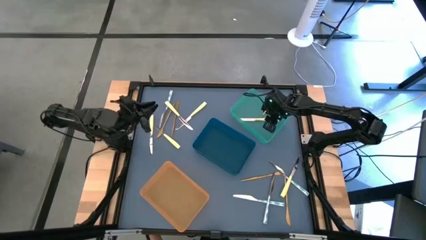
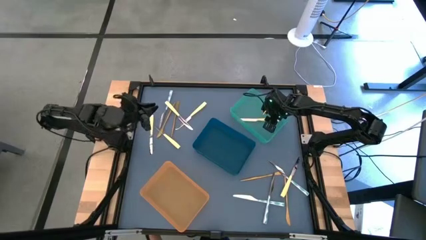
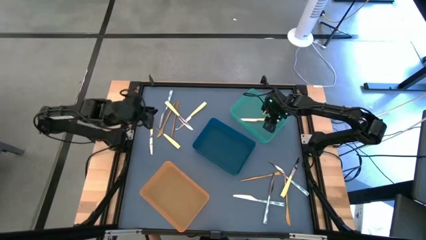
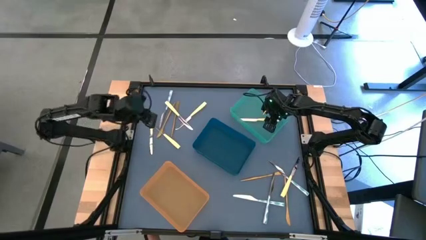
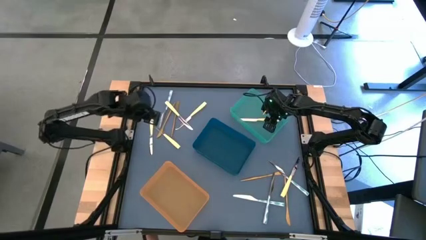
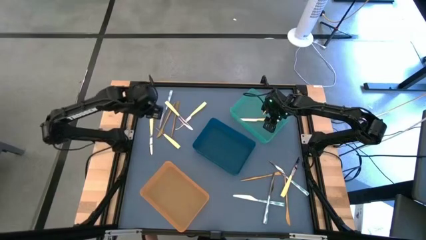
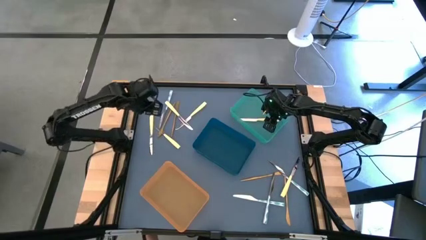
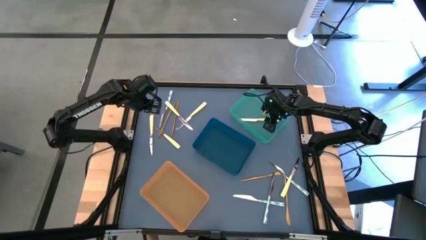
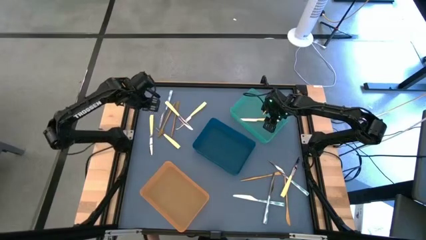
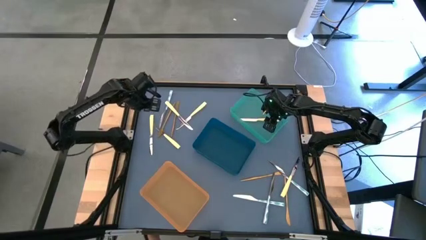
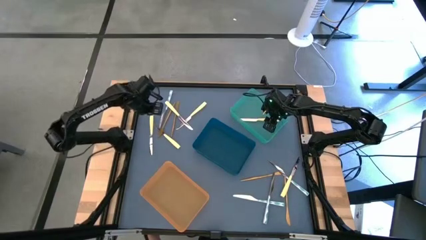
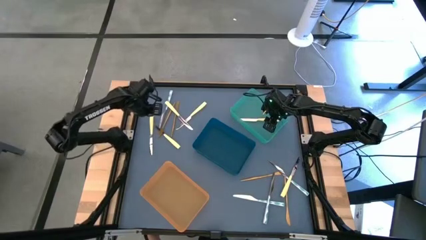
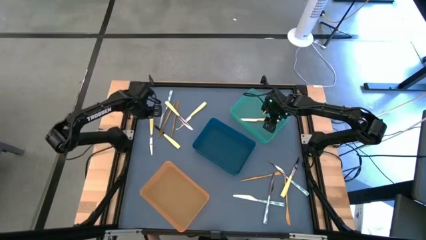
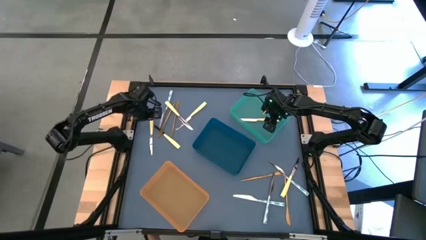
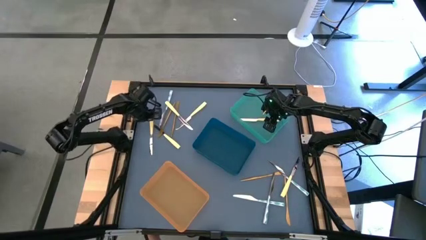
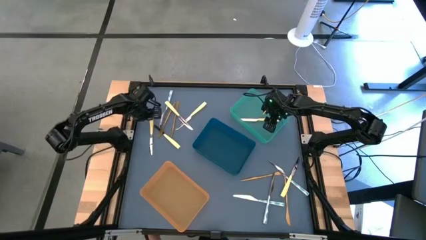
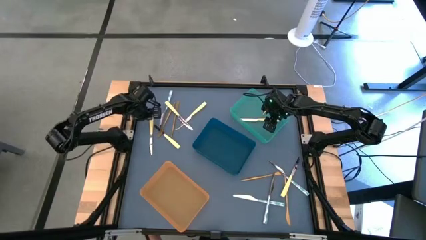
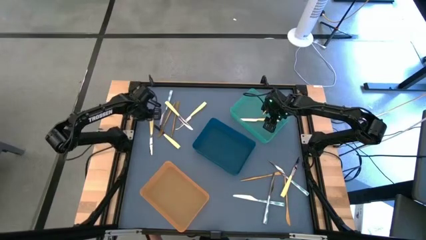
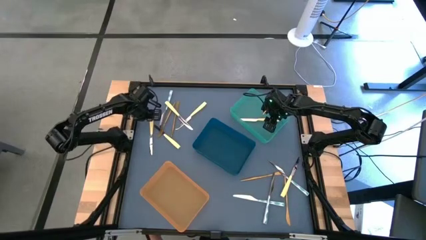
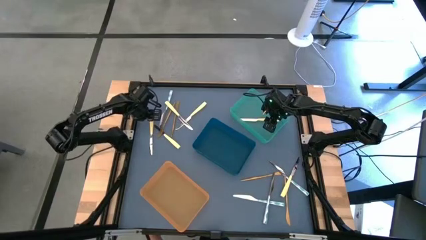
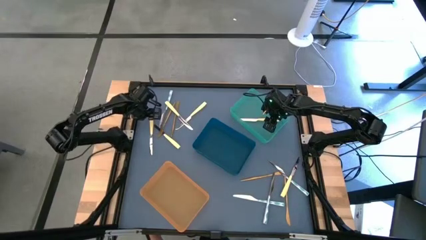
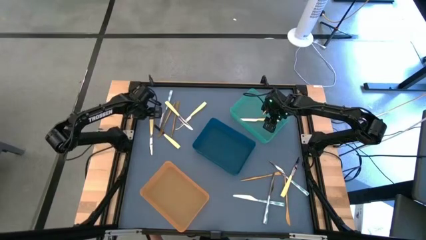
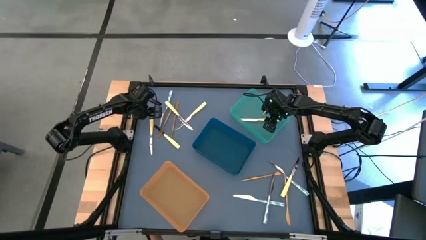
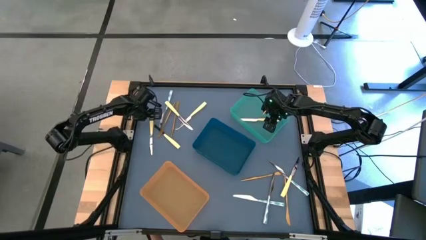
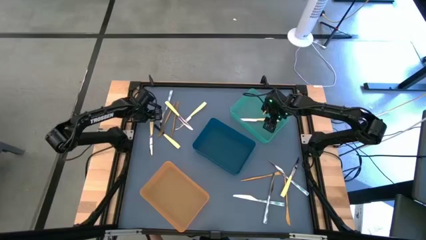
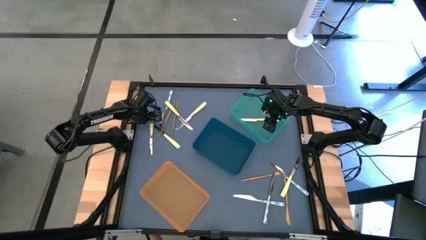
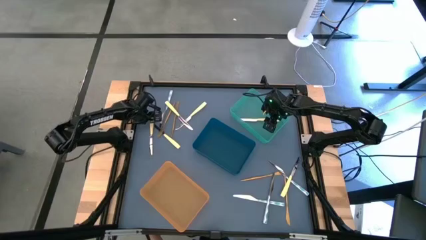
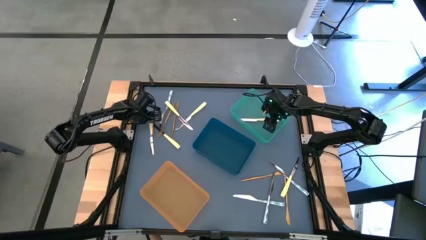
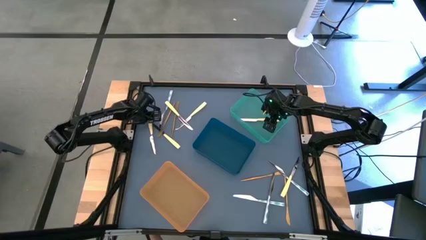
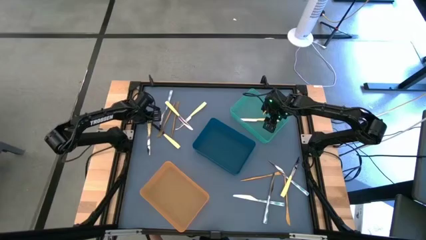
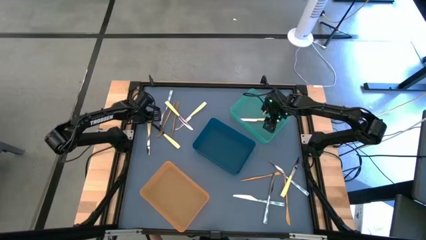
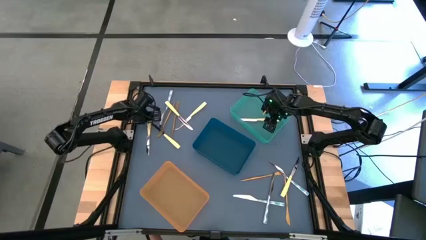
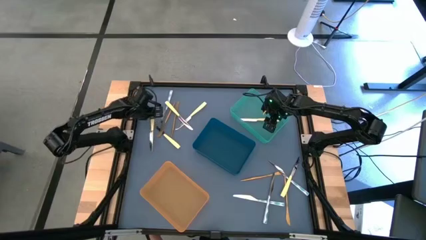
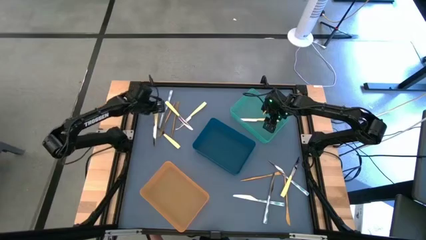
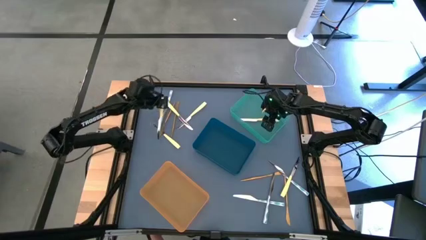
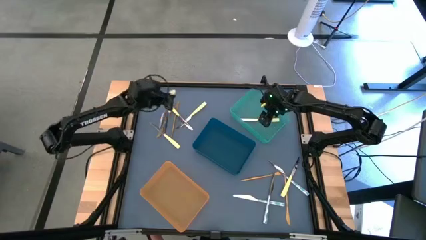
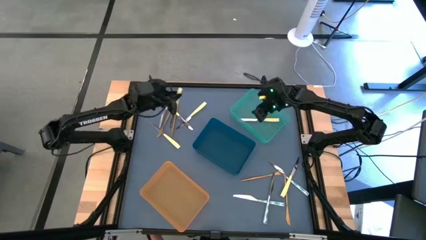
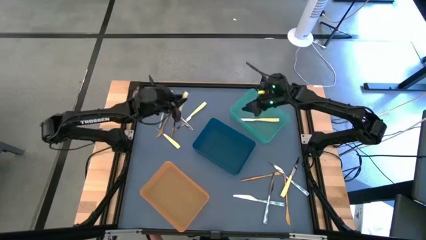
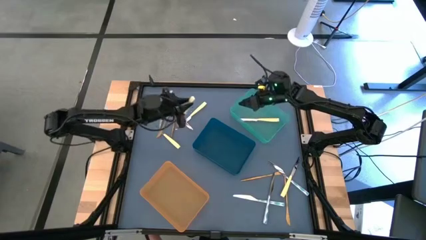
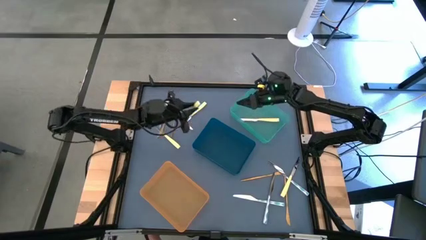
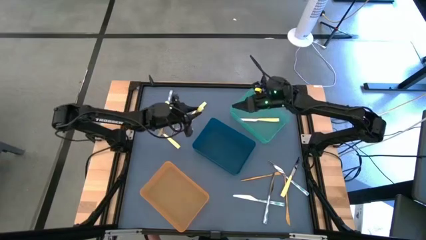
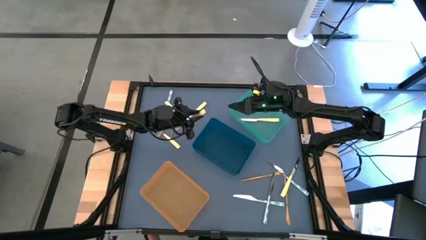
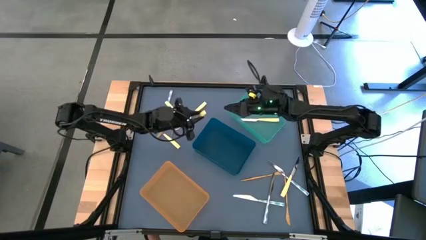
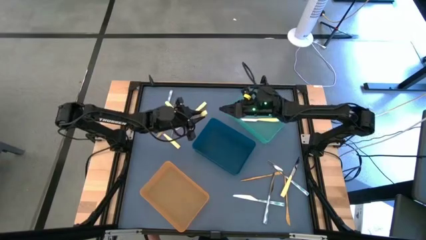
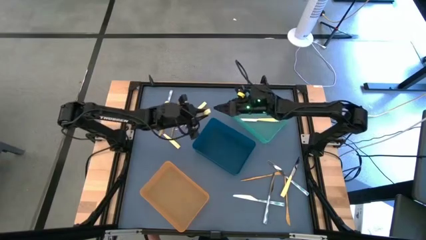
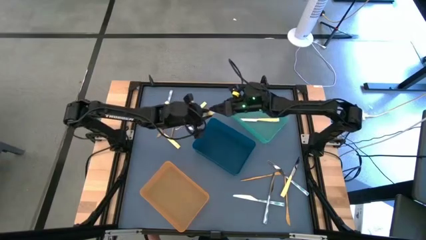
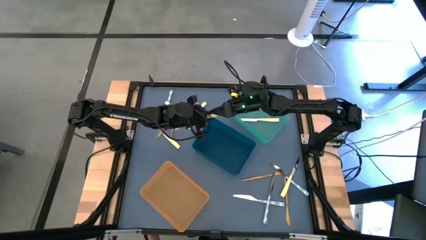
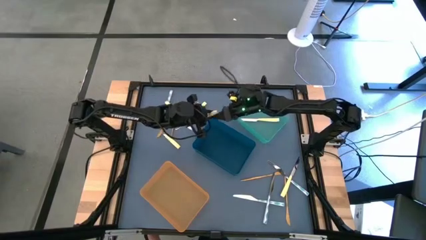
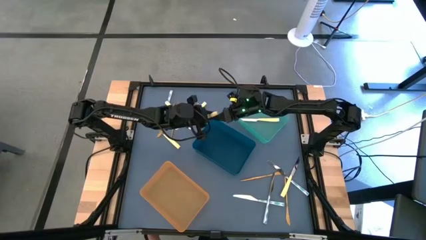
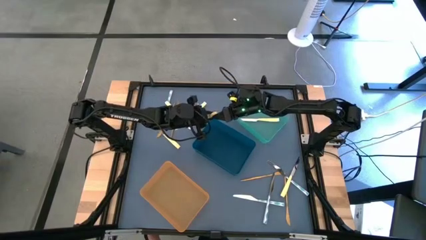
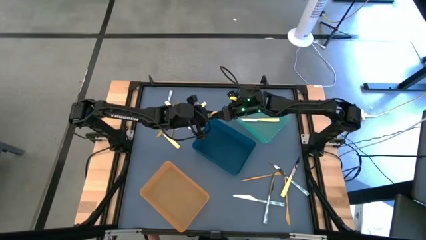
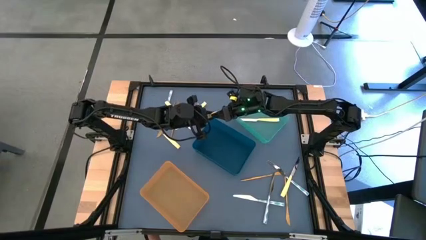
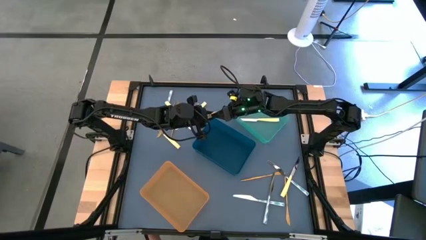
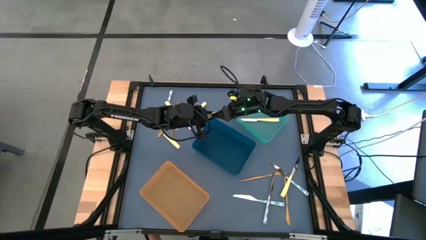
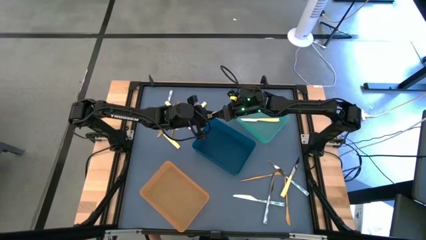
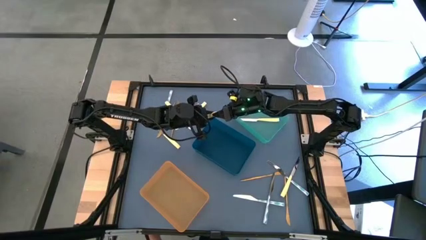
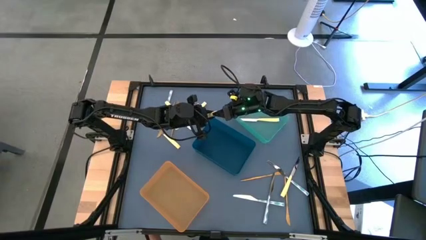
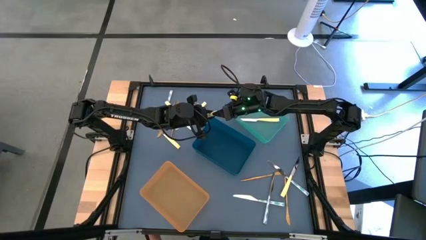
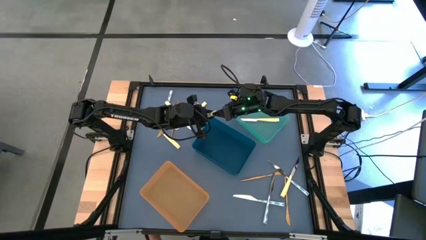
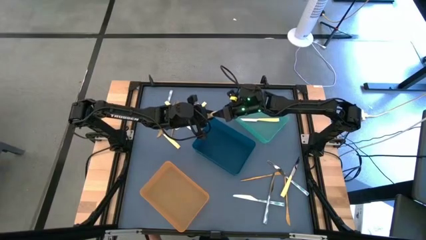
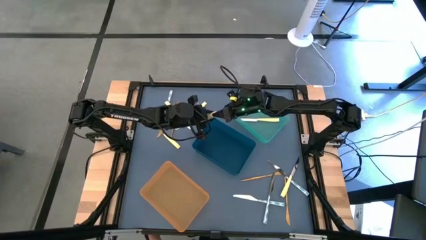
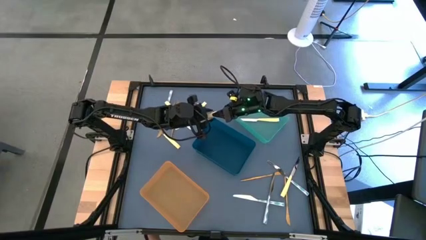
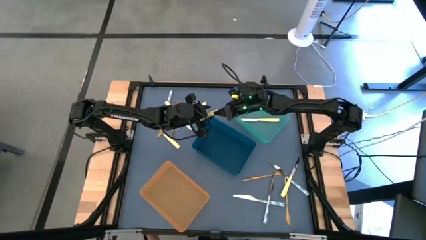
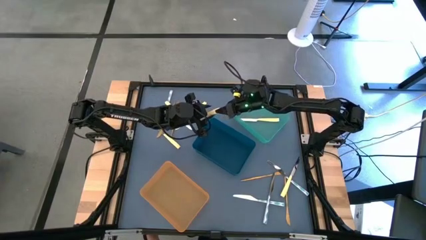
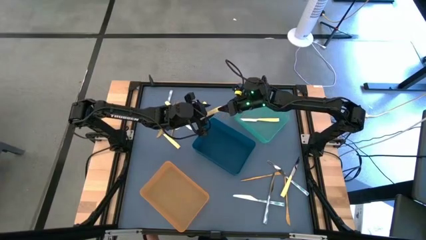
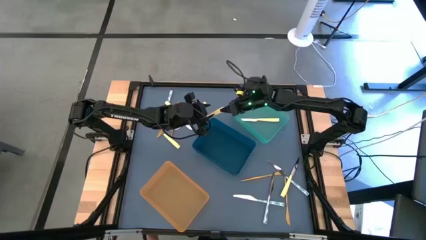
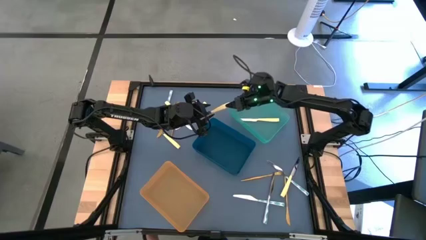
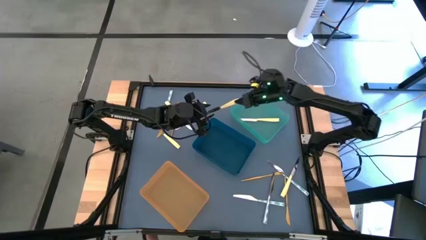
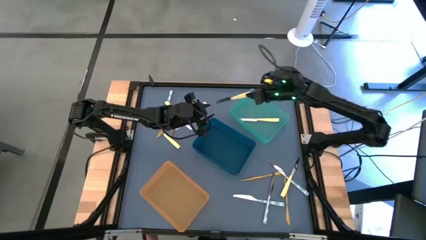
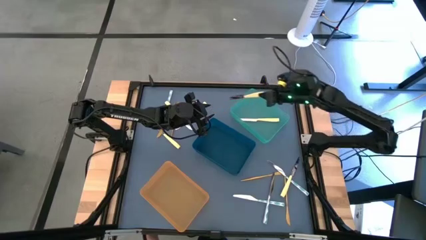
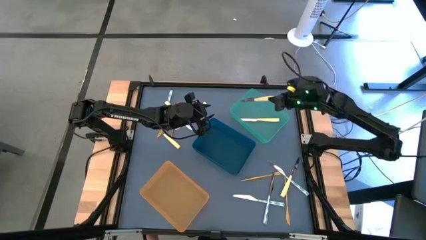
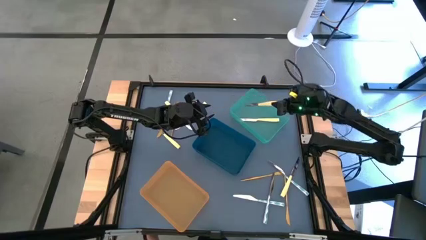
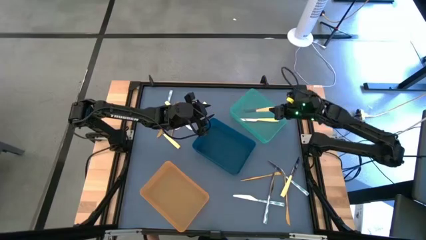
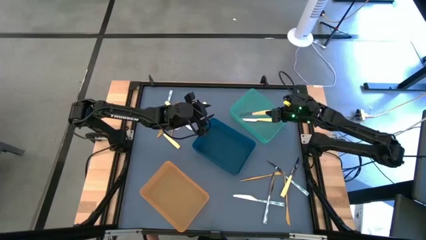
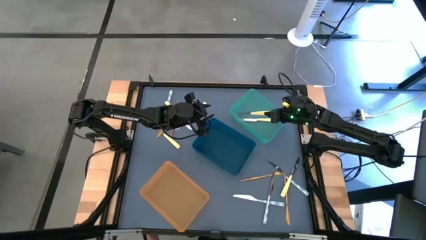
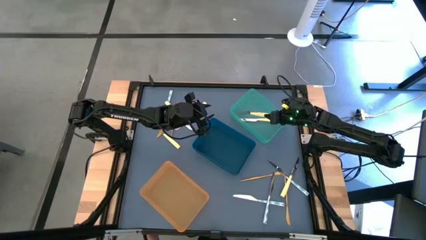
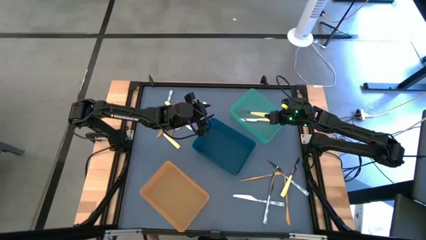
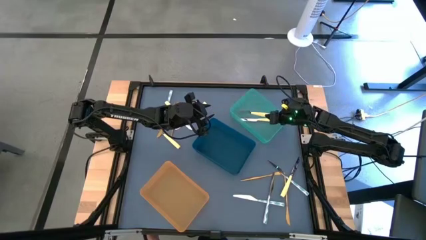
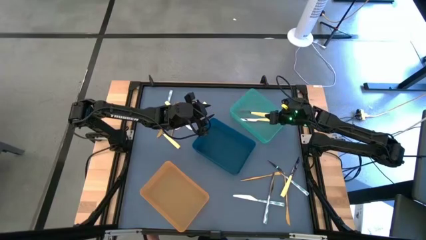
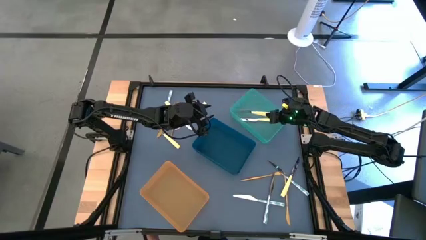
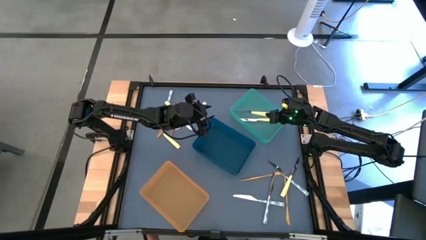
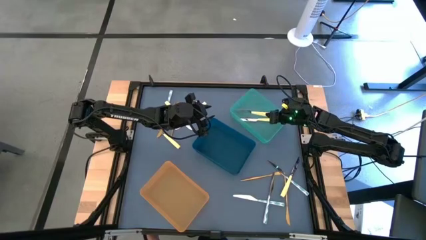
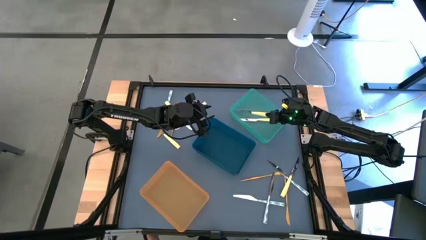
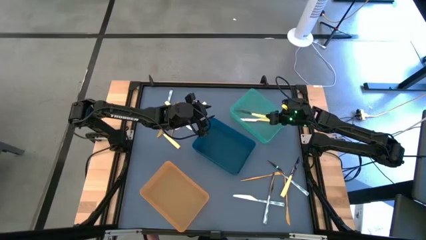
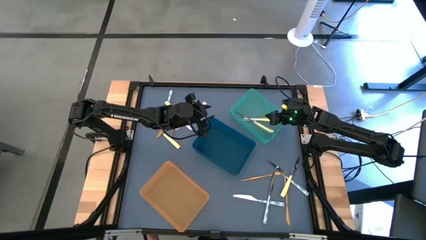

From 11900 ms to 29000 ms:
Task: Sort silverware by color (type)
Put the right yellow knife into the light blue bin
